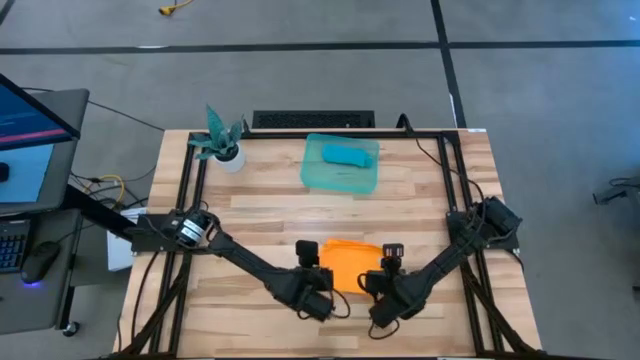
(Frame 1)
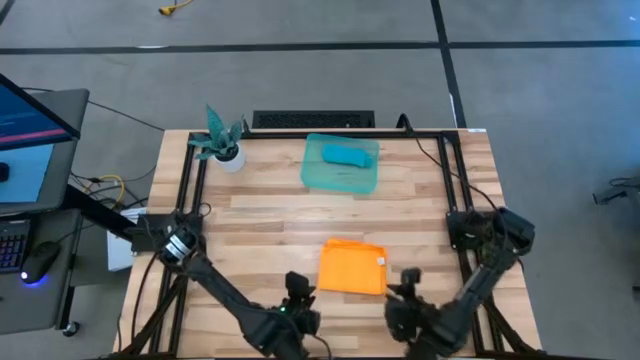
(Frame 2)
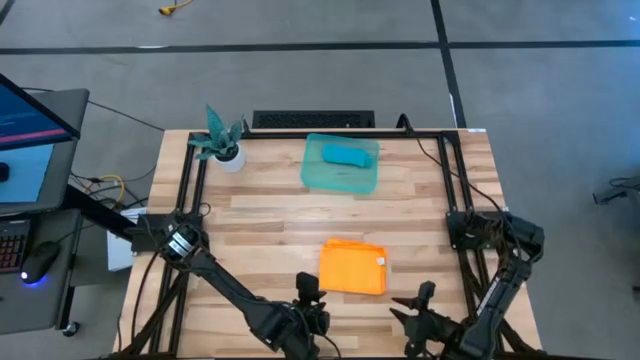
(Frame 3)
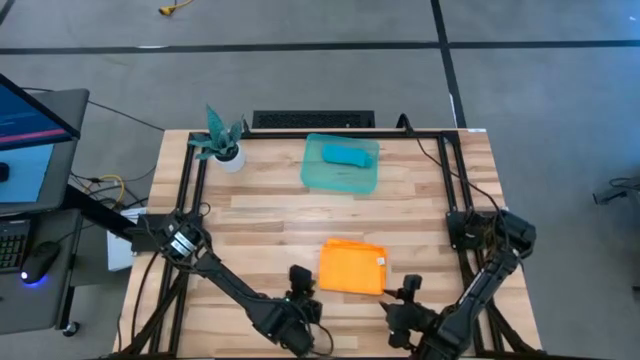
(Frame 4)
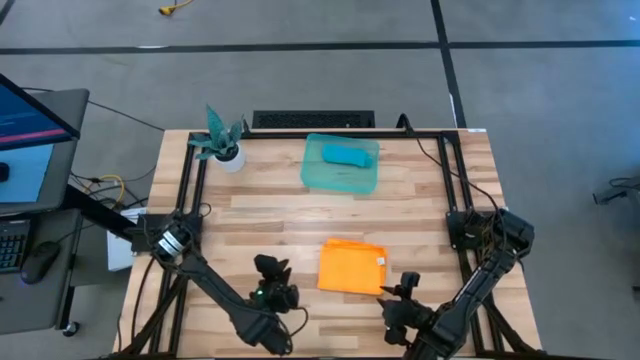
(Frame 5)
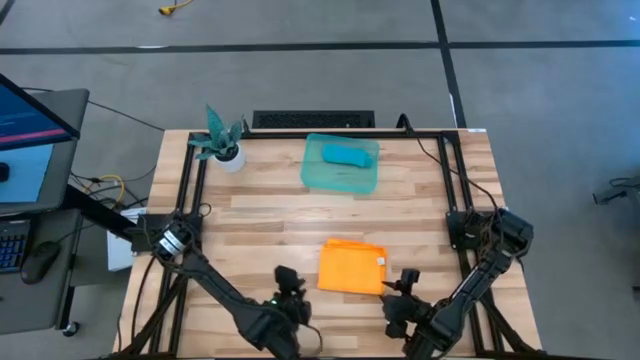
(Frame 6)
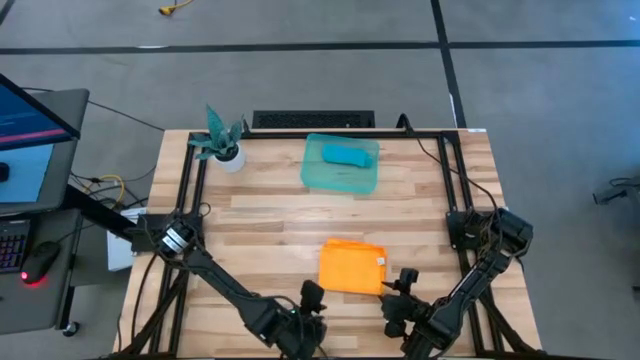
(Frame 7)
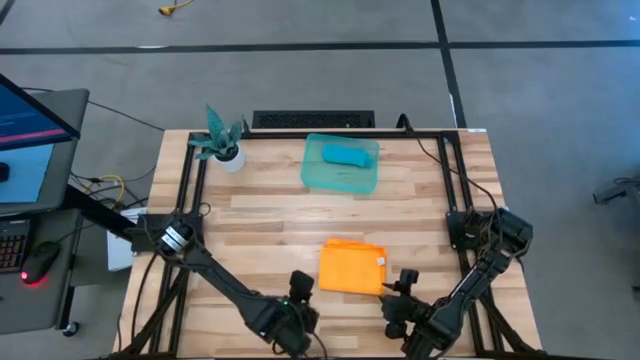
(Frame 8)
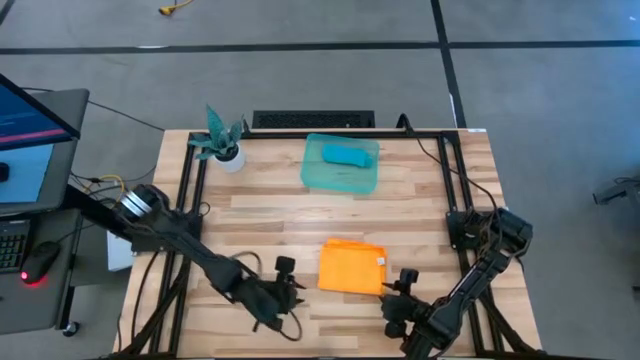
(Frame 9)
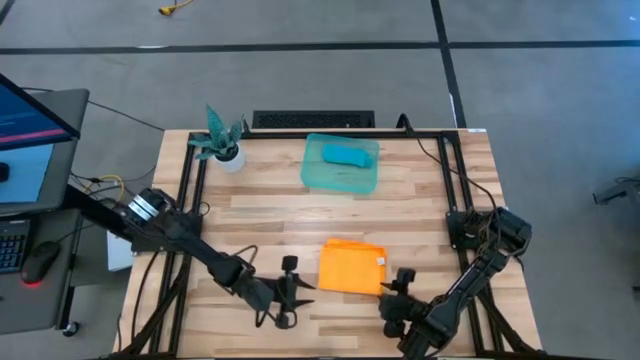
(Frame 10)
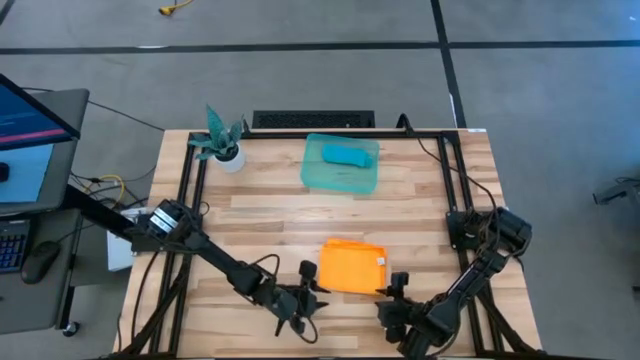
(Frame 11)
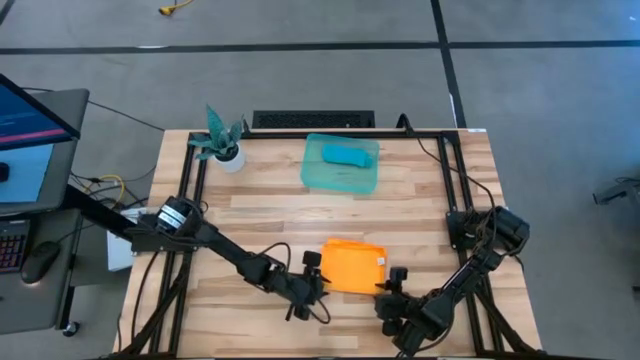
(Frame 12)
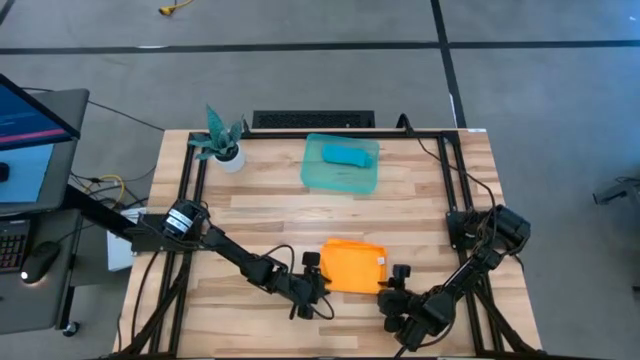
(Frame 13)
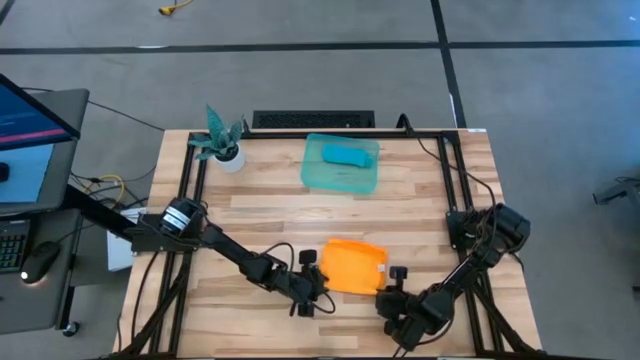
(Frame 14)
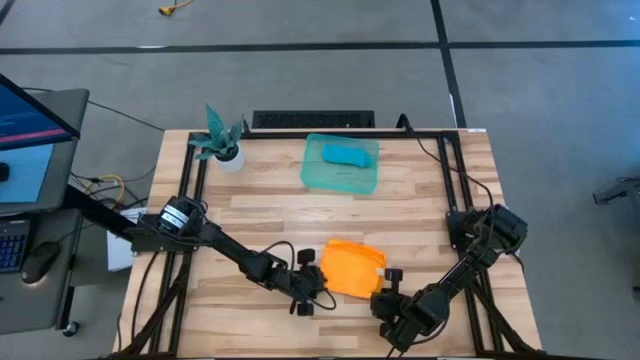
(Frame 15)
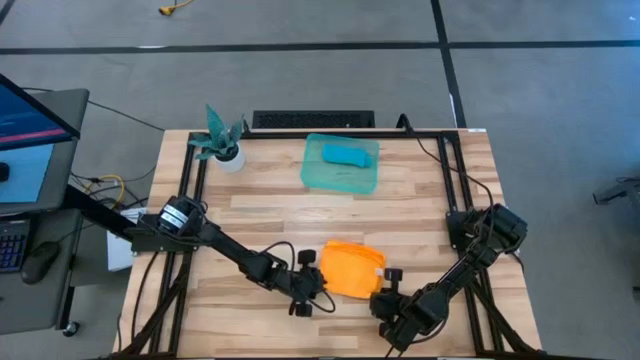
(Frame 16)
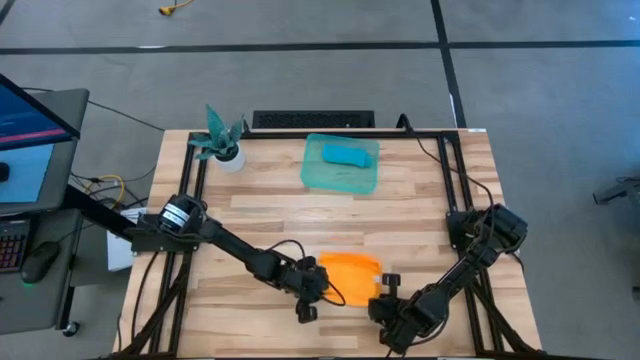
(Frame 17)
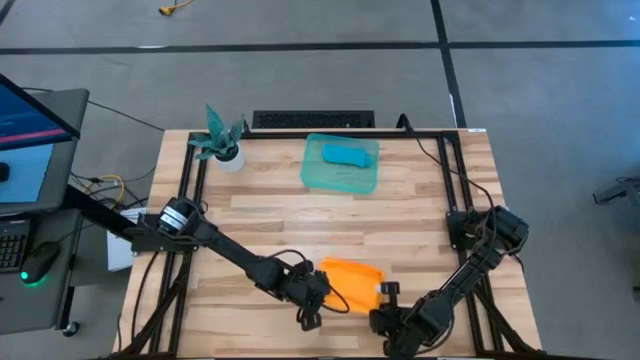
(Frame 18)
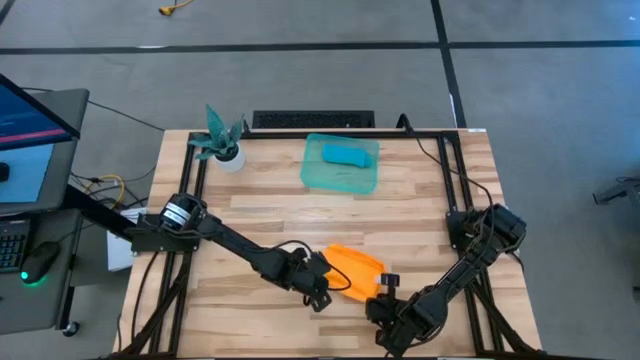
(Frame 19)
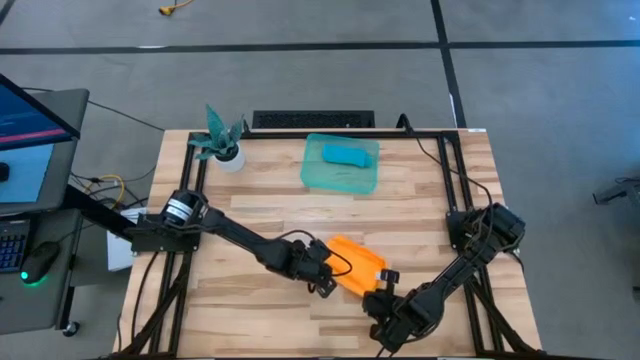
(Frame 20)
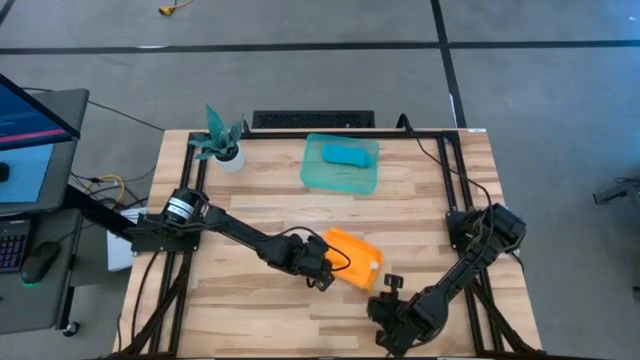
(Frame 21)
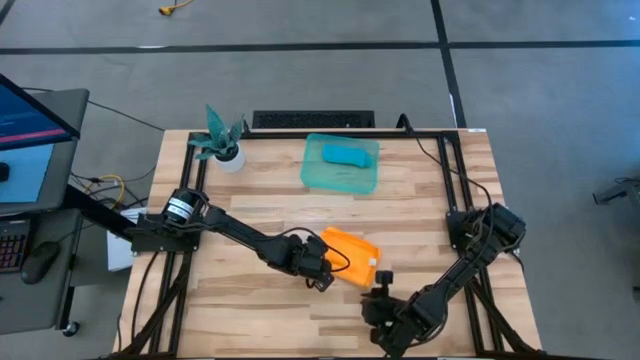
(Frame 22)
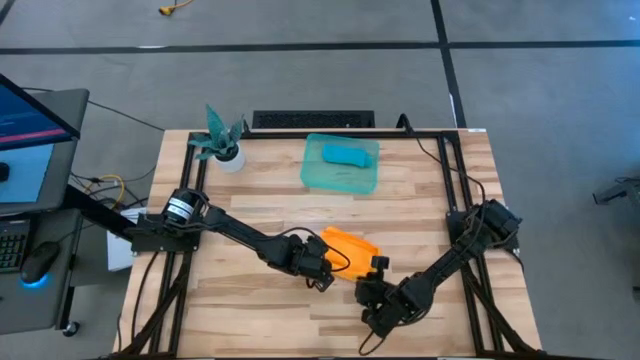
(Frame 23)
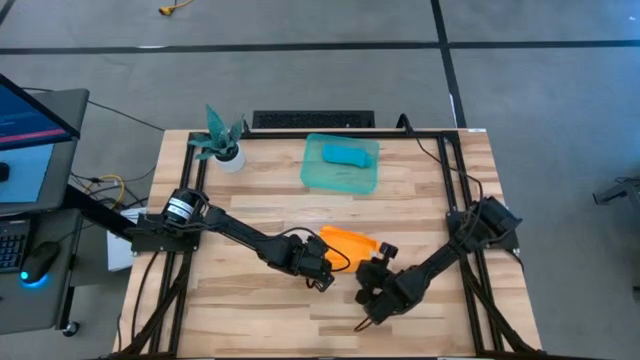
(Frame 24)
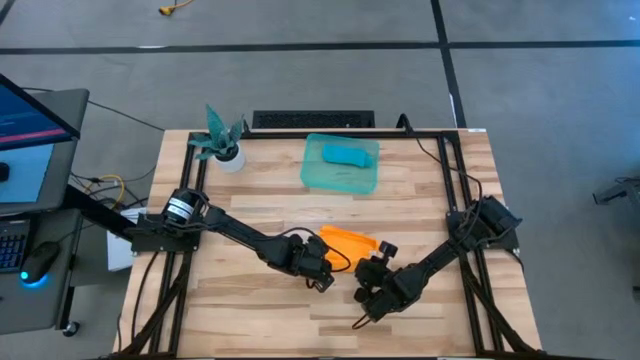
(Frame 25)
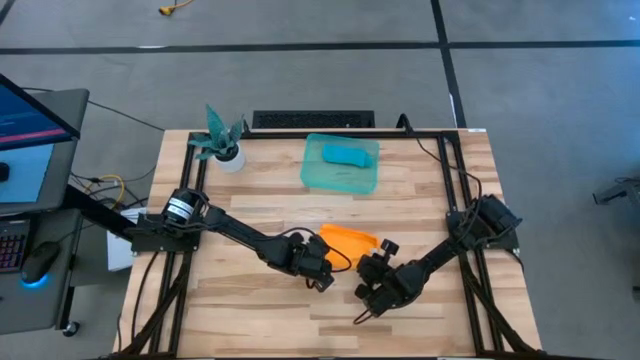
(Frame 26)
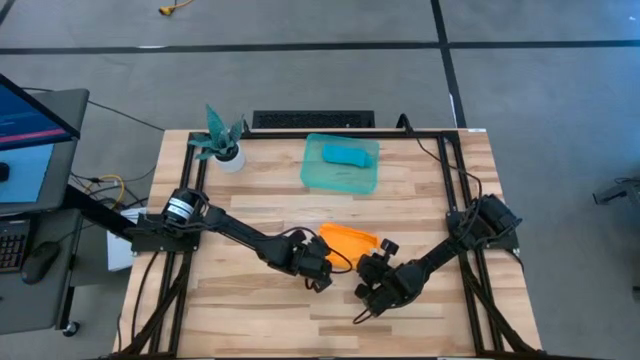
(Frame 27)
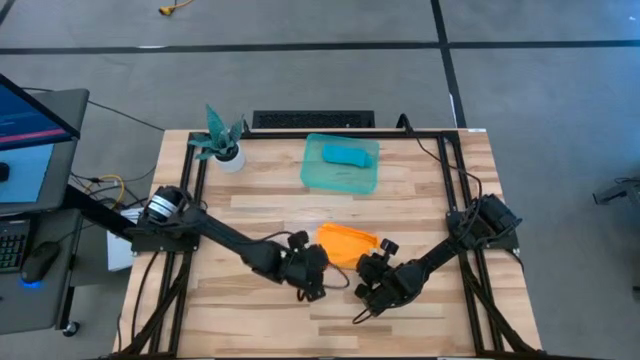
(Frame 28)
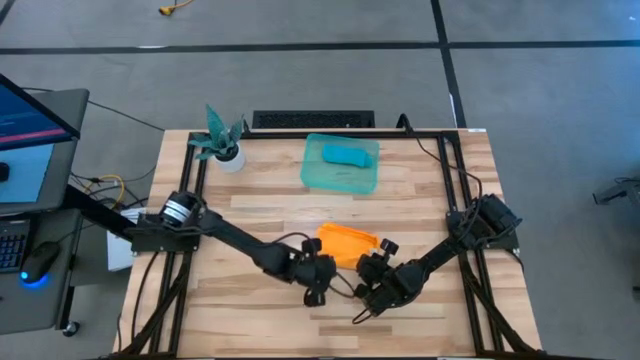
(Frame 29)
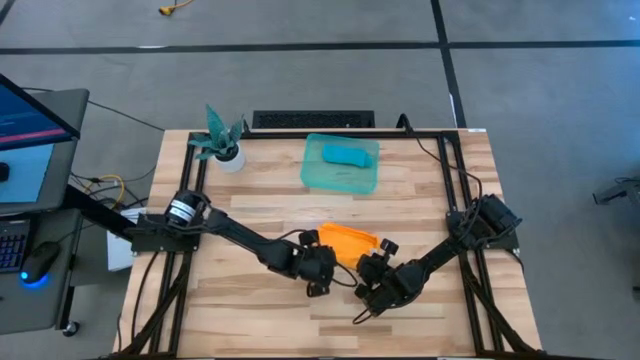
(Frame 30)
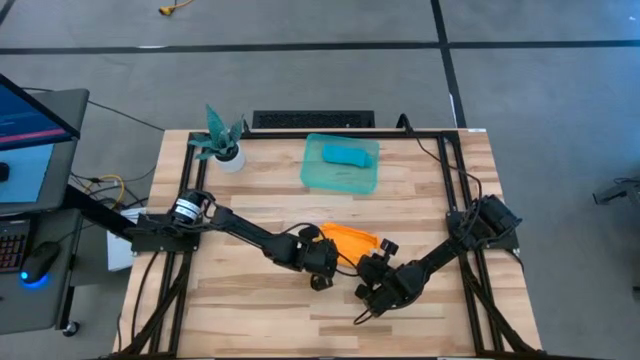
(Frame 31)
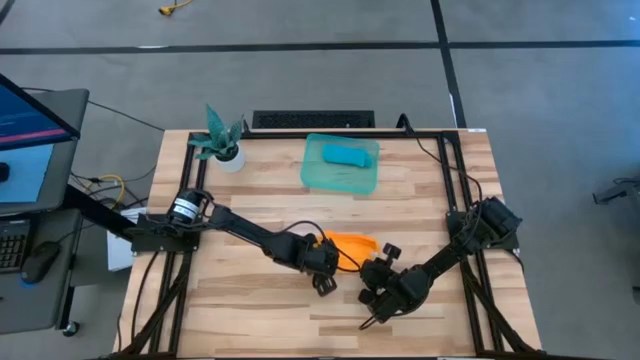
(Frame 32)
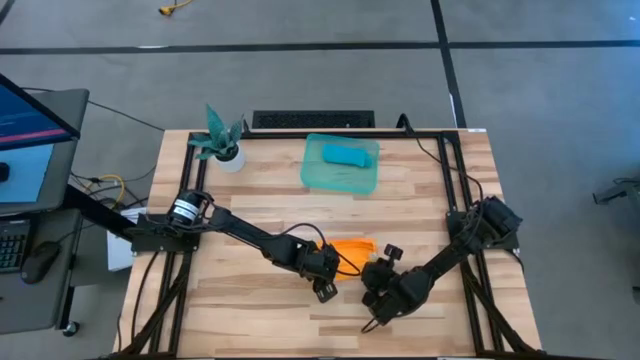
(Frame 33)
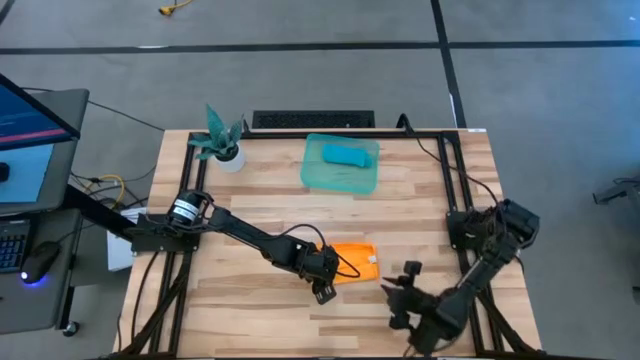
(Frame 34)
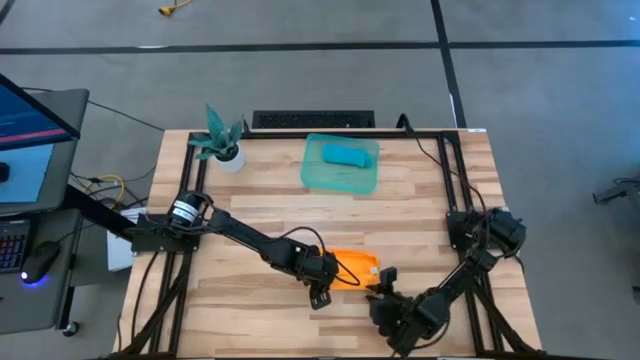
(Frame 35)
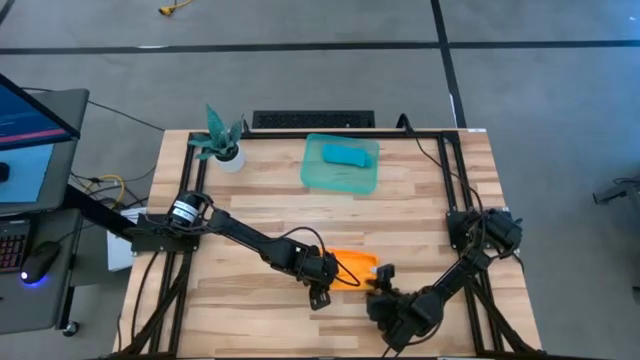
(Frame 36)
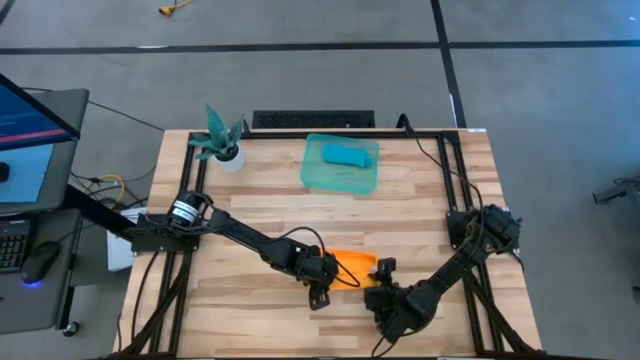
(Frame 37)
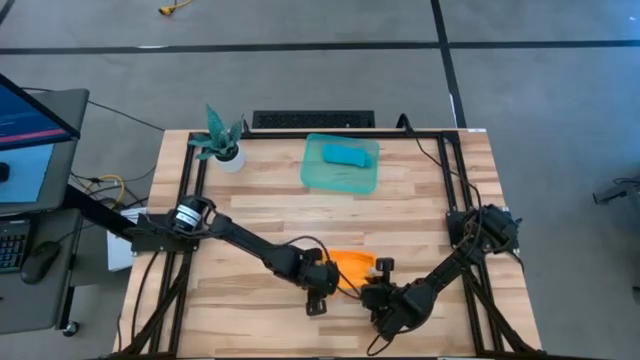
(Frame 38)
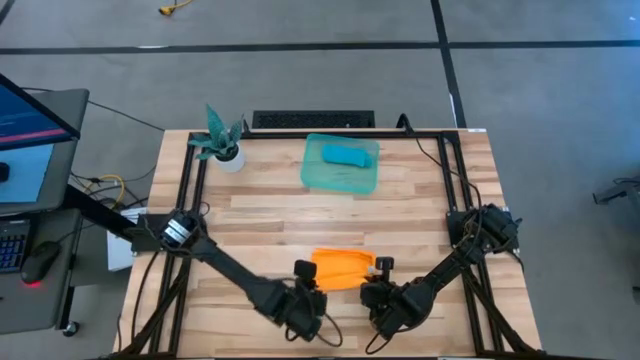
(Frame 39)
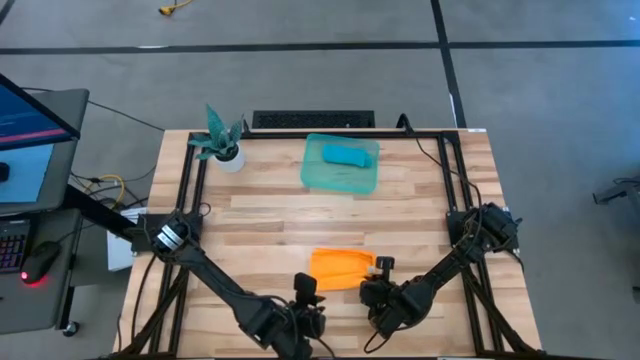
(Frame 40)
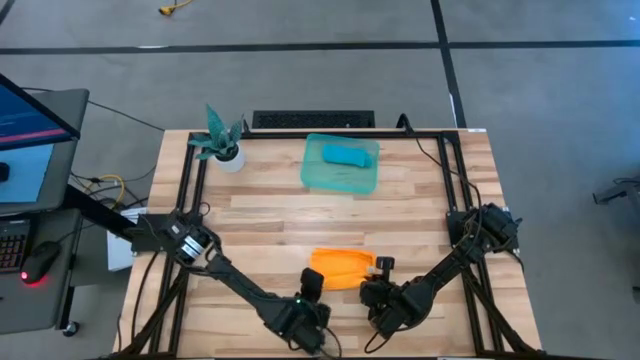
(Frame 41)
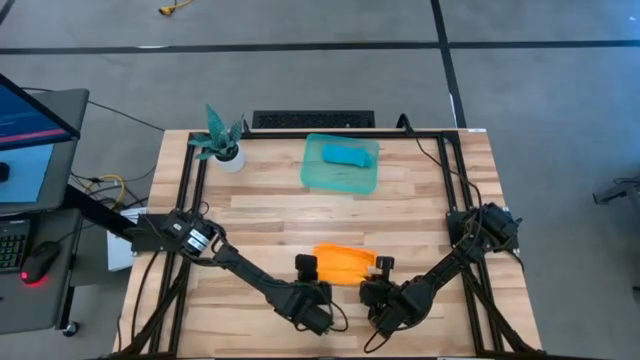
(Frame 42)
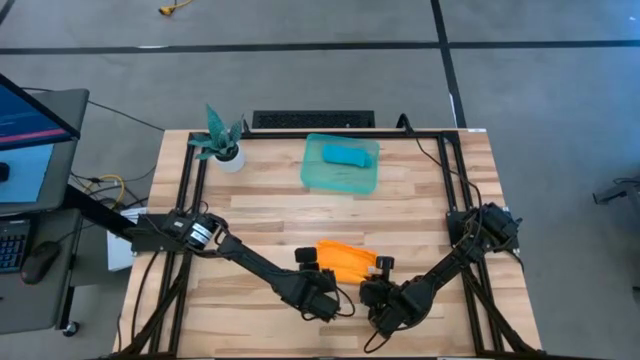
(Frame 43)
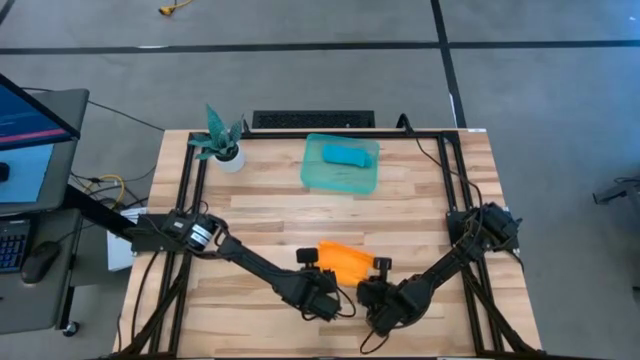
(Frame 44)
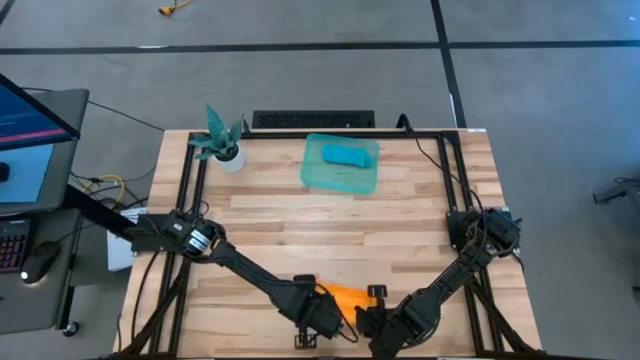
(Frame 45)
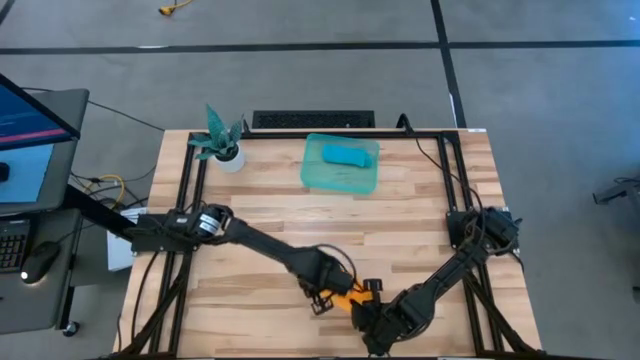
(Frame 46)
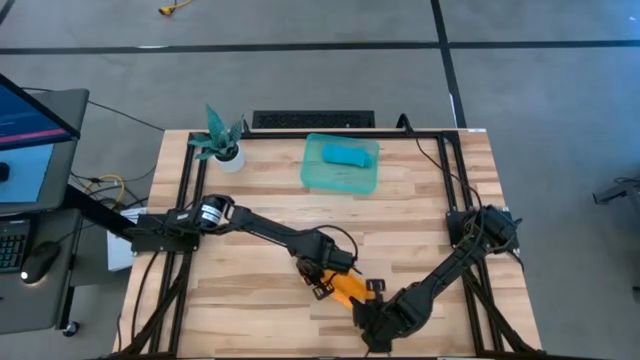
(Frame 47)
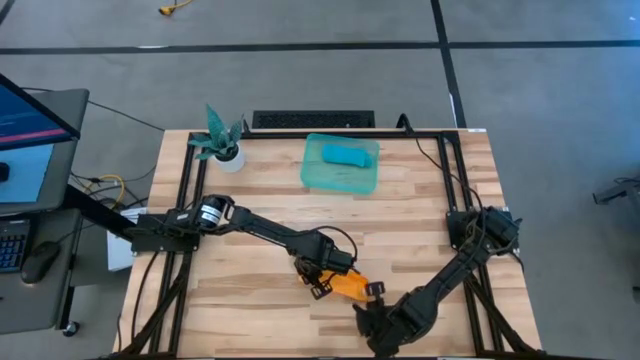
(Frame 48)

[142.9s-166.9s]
Task: Roll microfiber towels into tight, uniform cylinder then place into a basket
Roll the yellow microfiber towel
